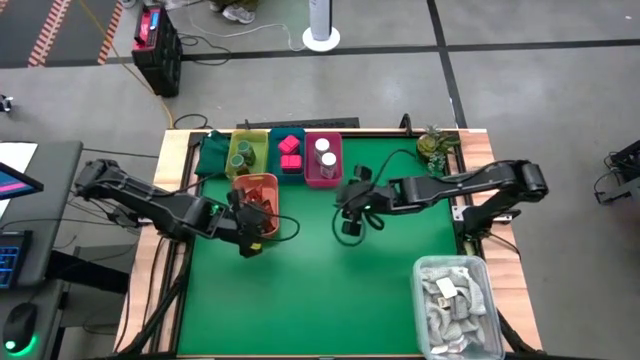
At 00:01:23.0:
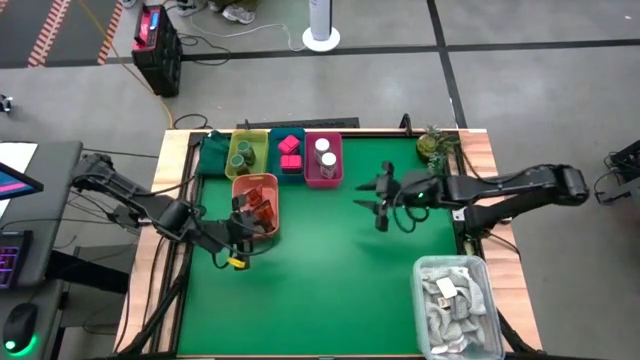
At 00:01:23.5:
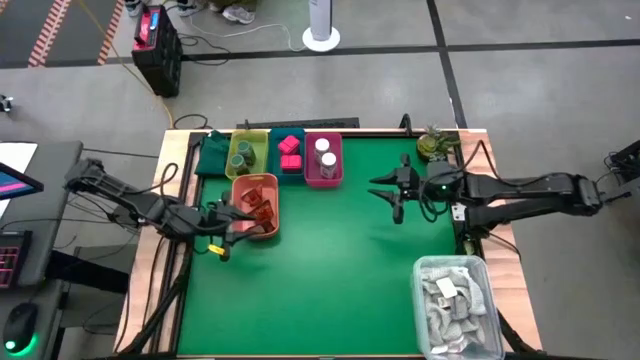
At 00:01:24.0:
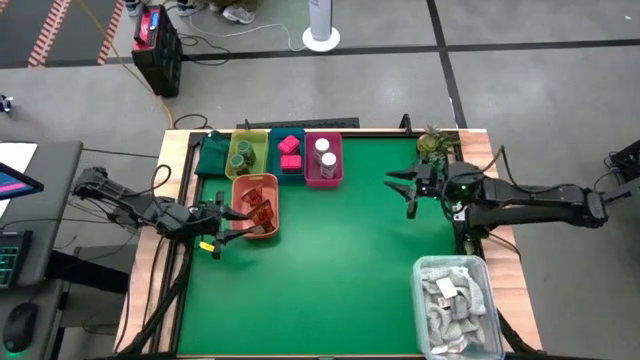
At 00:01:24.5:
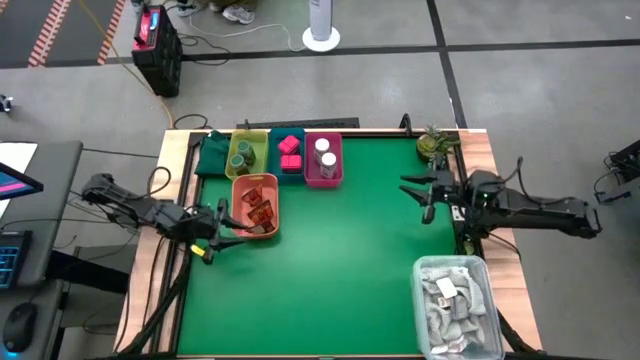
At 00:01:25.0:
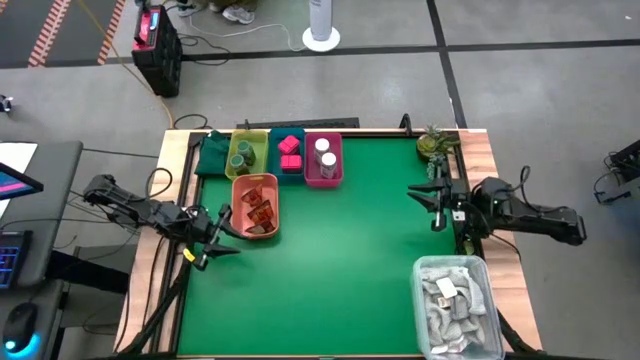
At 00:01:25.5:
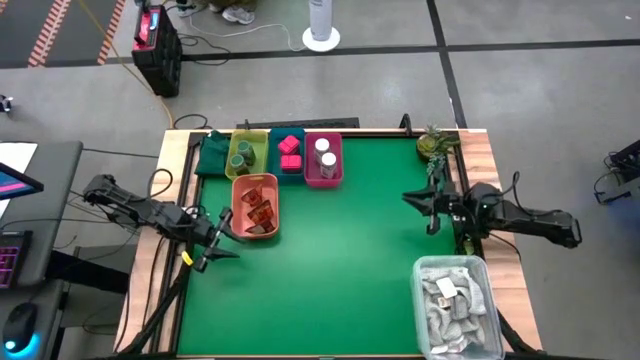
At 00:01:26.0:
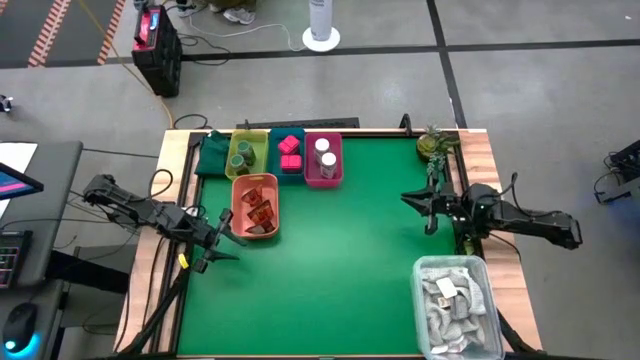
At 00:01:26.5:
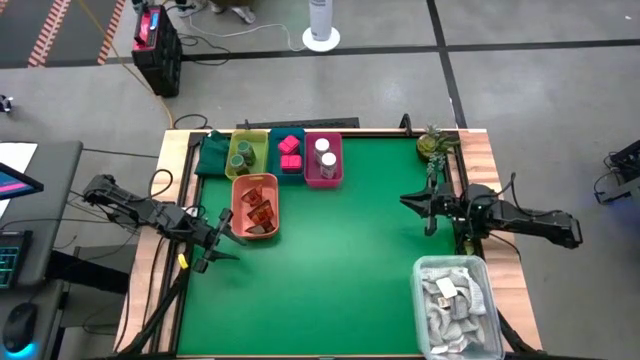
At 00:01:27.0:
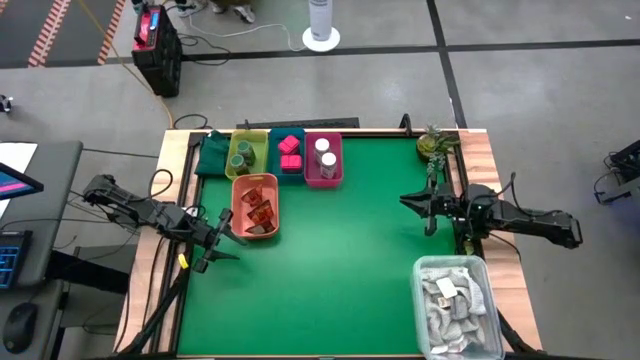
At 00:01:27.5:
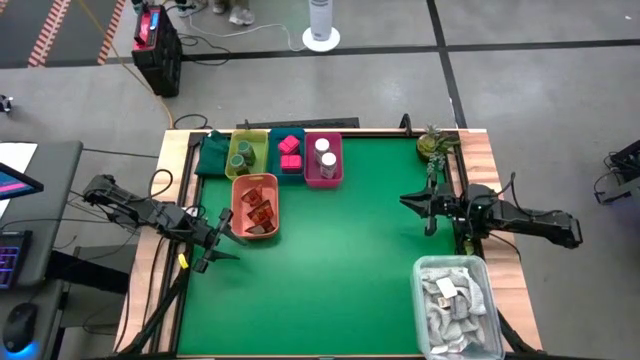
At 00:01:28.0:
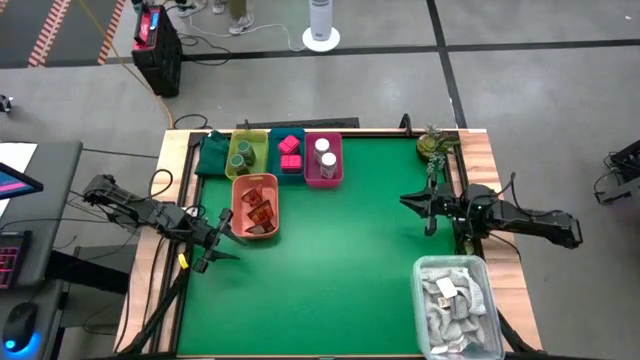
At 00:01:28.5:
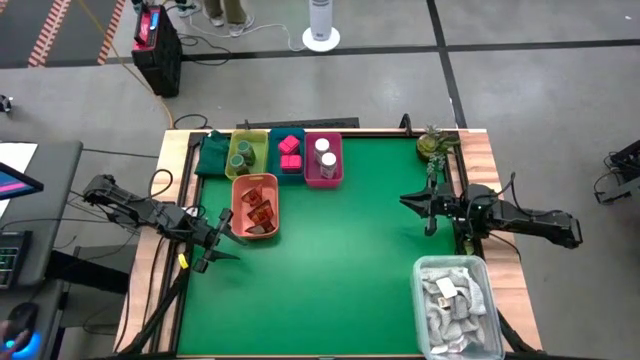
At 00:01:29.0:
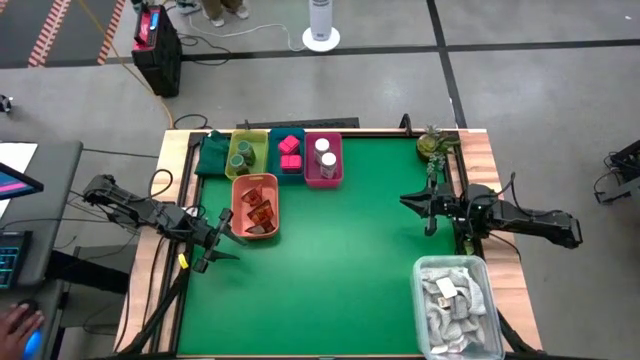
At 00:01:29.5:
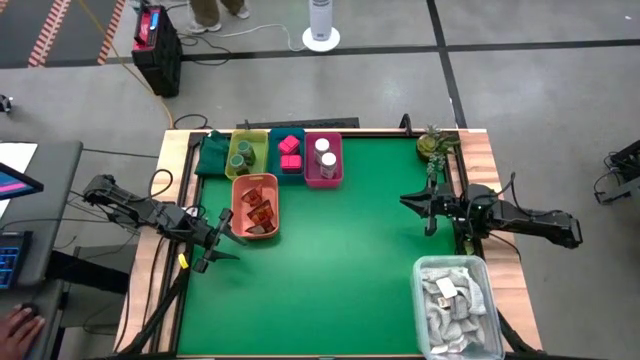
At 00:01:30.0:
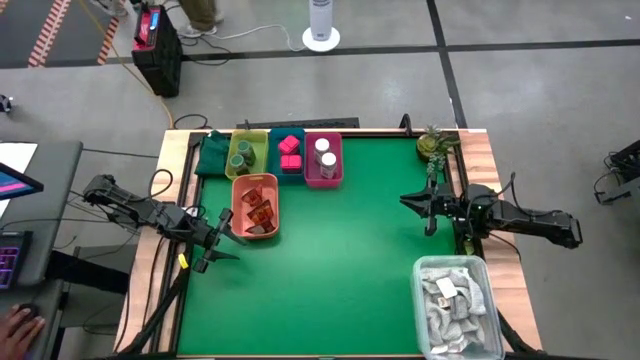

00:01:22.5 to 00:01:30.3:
Task: Sort spices by type
Return to Home Position

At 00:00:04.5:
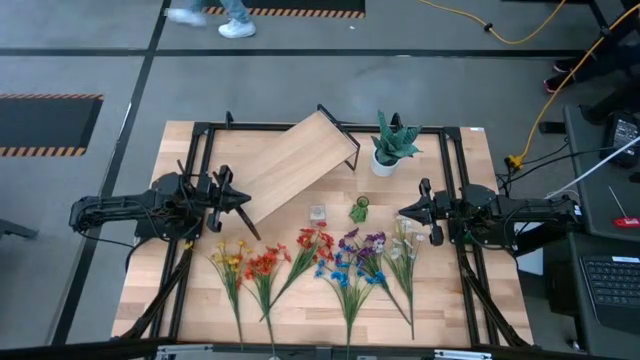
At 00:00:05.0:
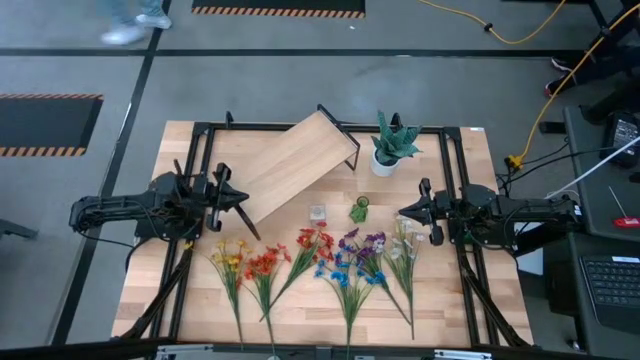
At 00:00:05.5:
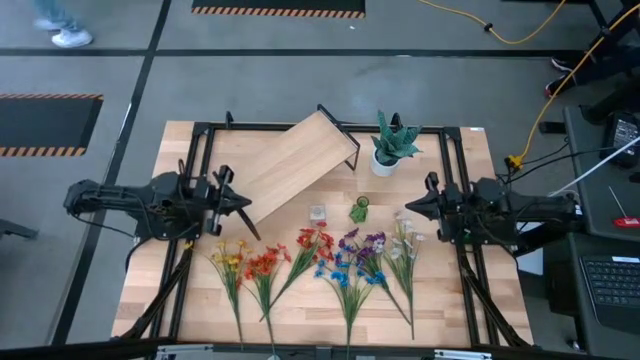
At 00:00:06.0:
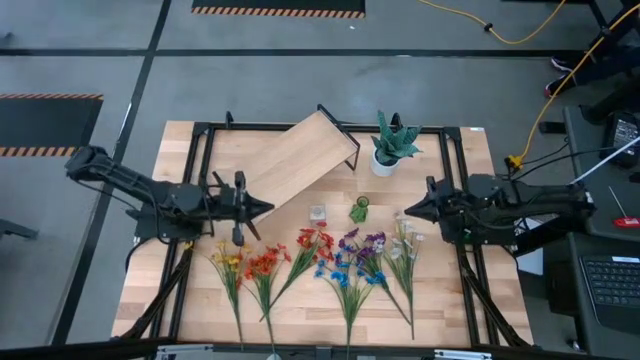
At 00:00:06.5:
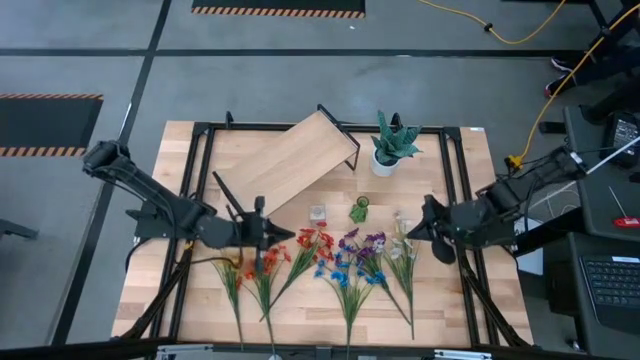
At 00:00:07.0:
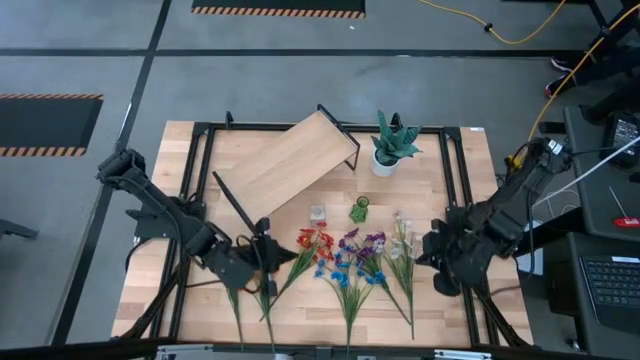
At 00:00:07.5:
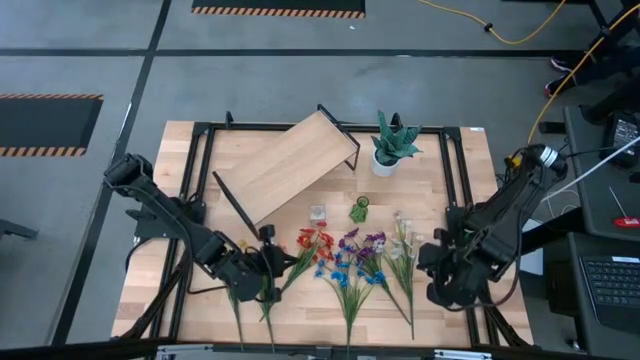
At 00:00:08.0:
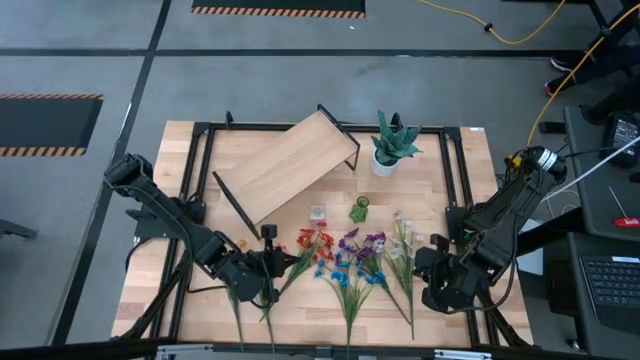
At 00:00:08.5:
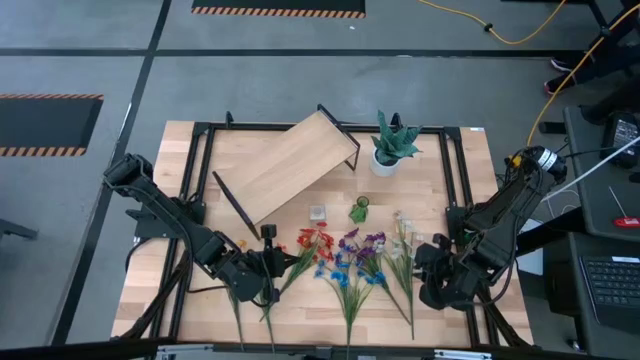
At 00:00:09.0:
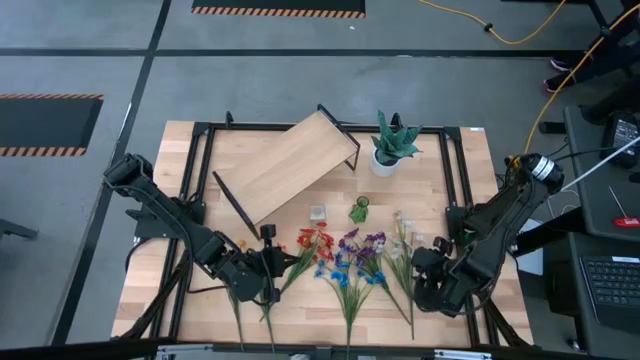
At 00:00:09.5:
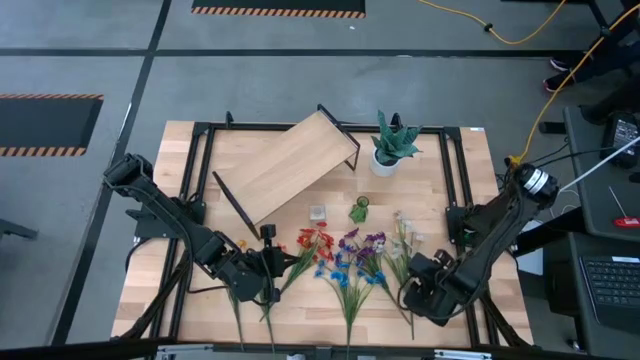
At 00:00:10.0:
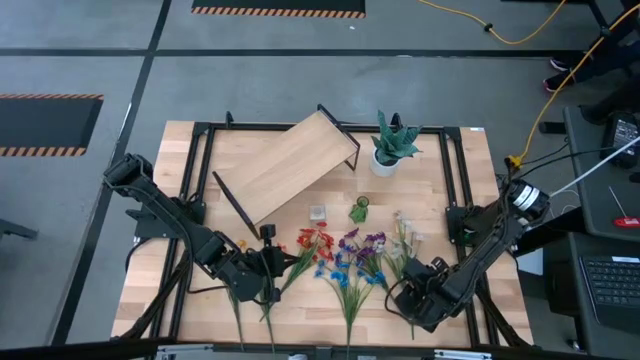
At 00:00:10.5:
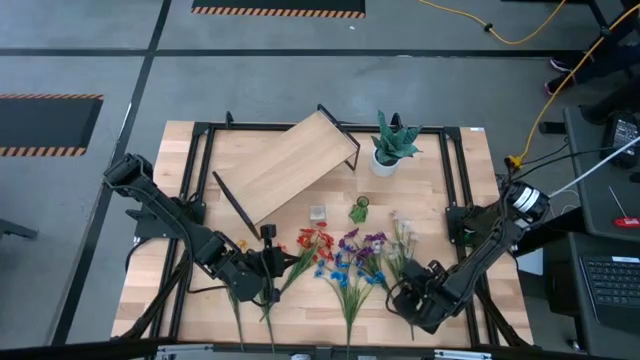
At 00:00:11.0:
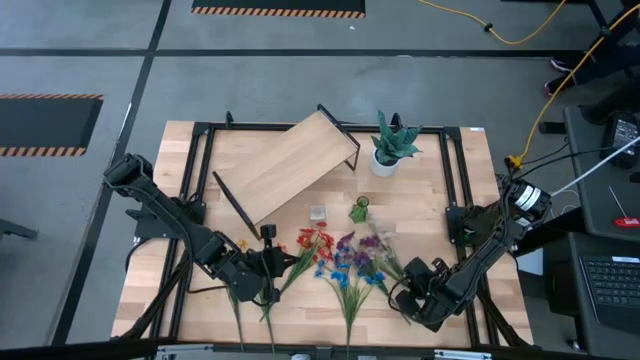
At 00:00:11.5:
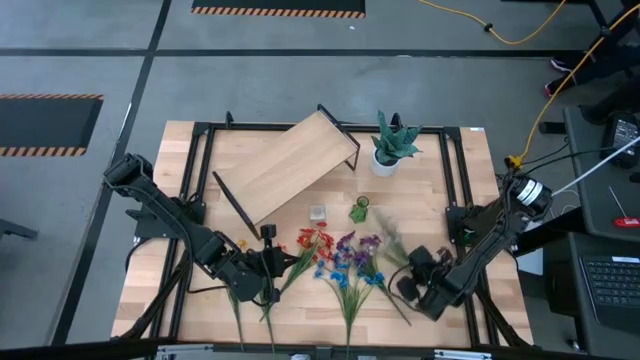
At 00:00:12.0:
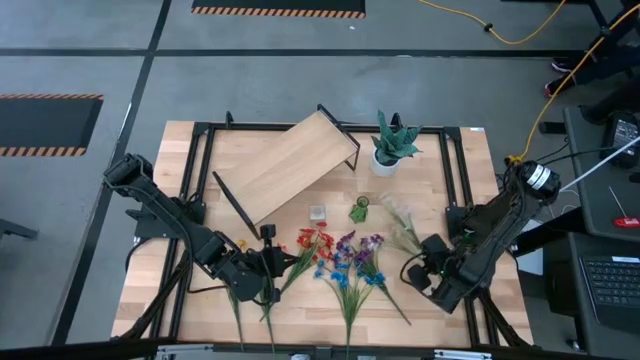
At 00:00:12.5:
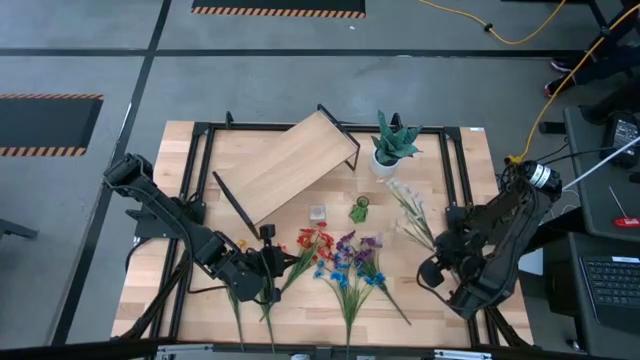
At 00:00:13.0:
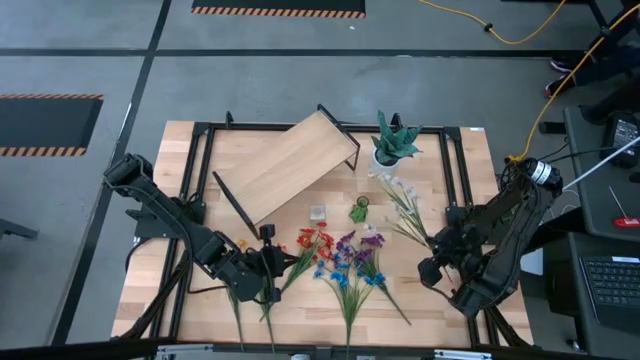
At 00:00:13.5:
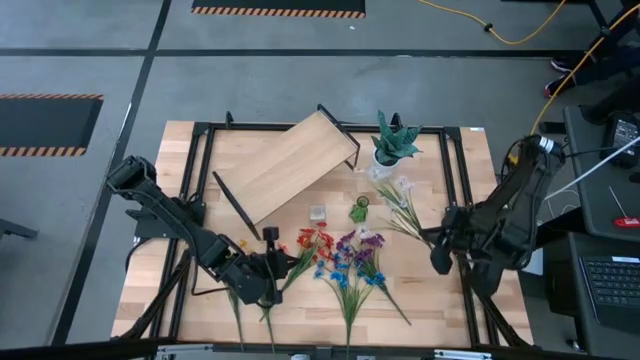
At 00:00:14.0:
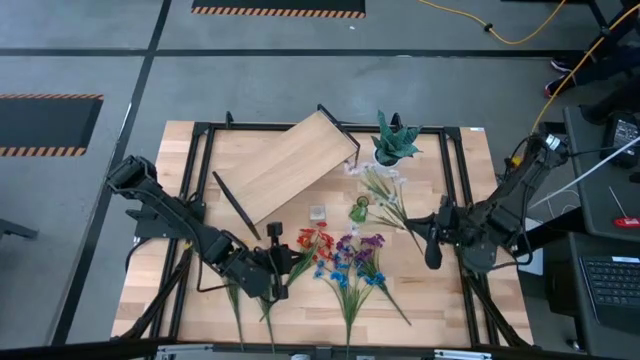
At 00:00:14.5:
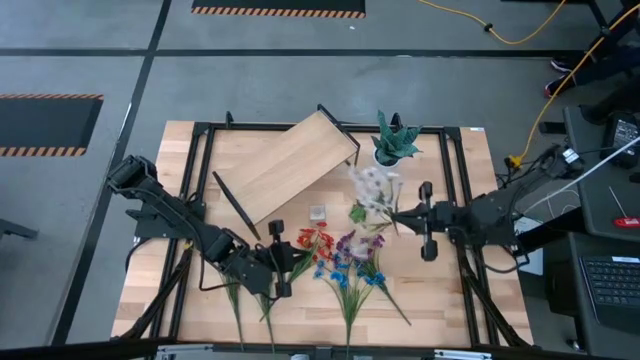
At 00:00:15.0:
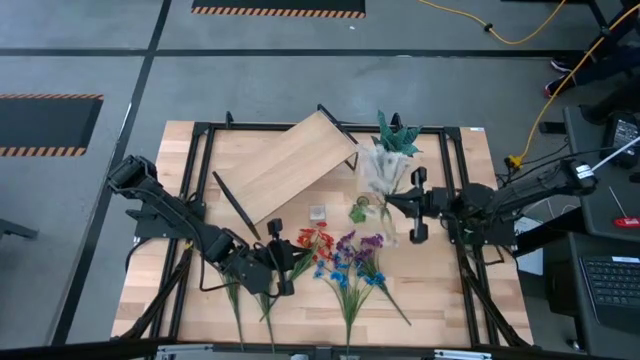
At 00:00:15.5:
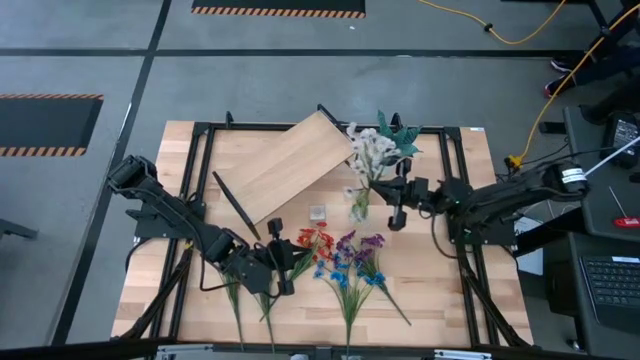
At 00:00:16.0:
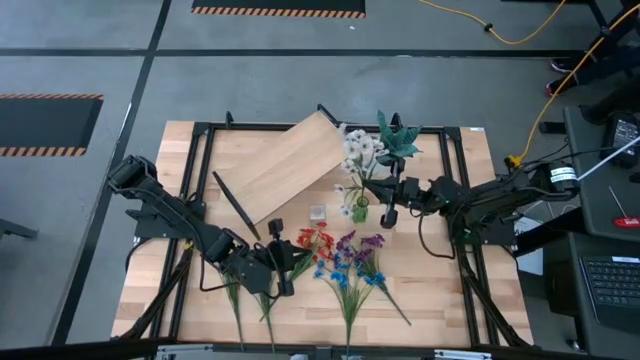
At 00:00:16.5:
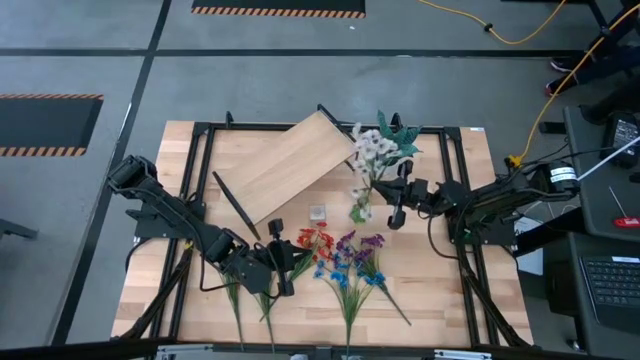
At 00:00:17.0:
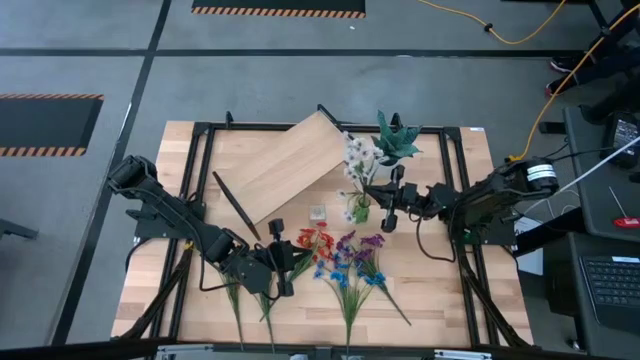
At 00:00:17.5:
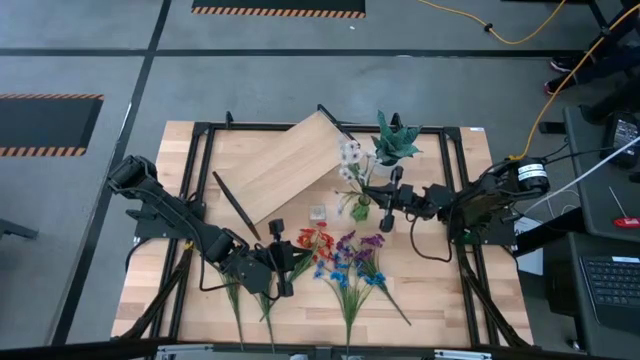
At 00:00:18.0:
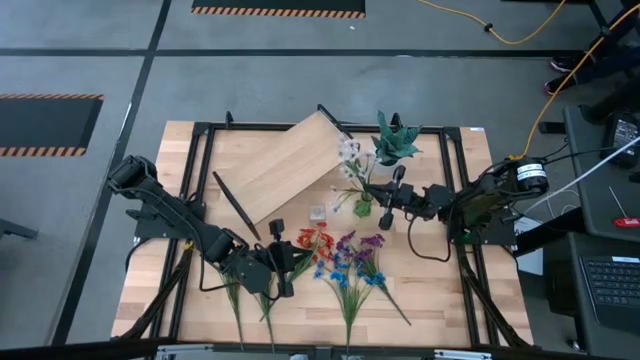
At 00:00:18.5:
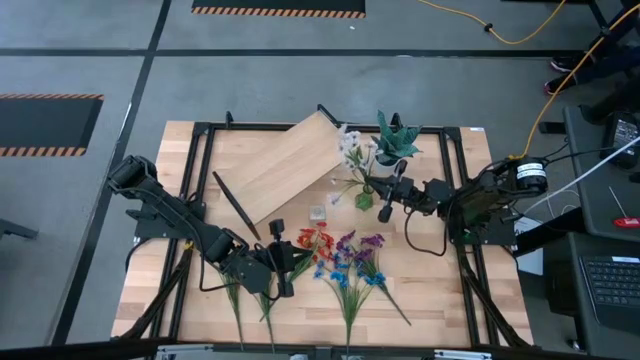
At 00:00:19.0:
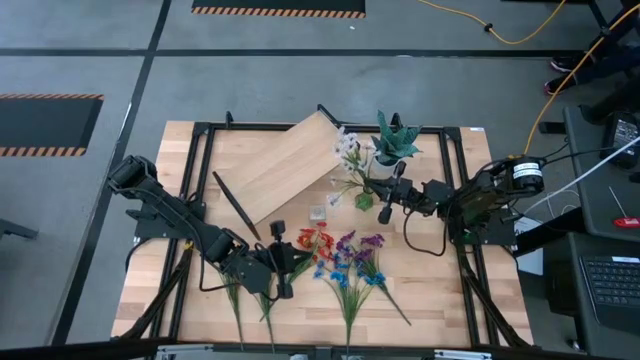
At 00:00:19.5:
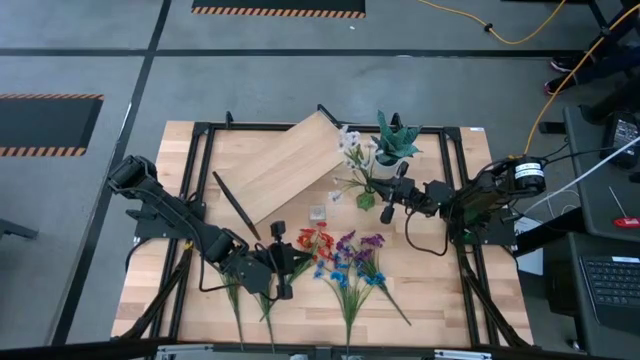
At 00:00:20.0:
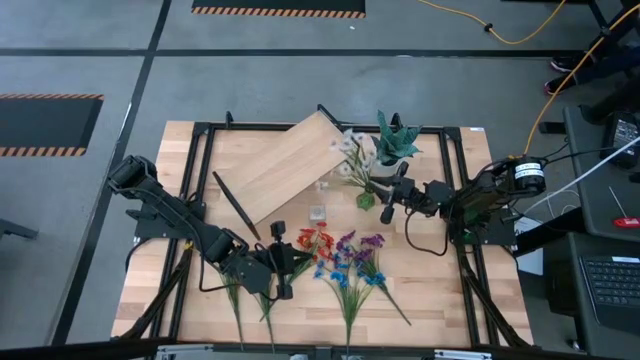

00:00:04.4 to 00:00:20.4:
Task: Pick and place flowers into a vace then onto a shelf
Put the white flowers into the green vase
